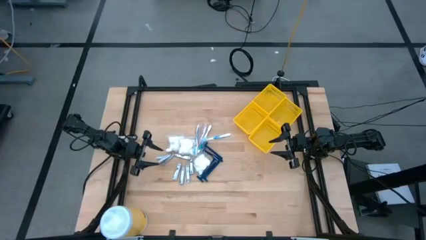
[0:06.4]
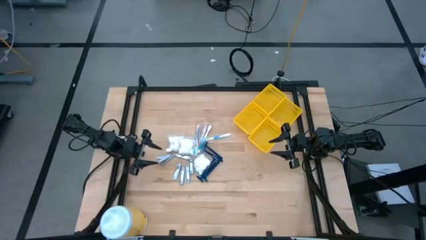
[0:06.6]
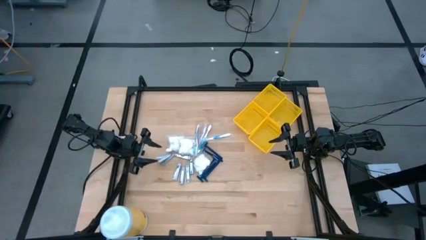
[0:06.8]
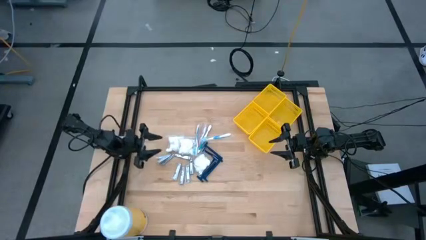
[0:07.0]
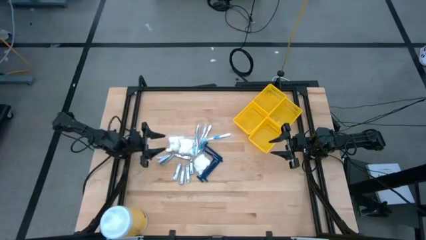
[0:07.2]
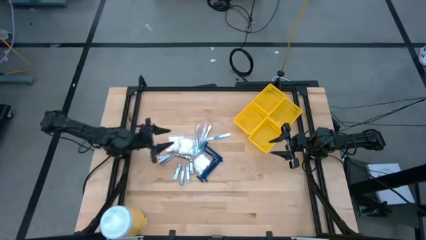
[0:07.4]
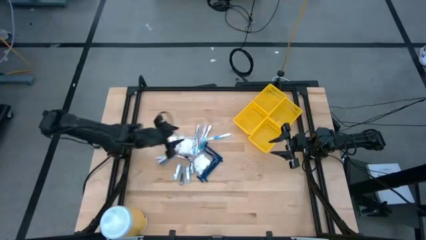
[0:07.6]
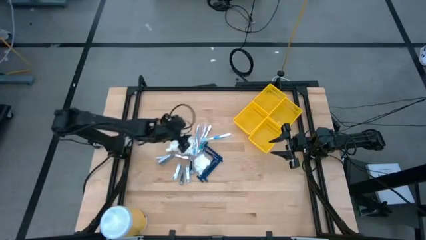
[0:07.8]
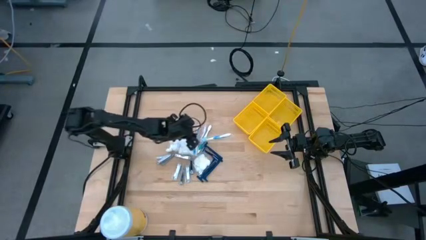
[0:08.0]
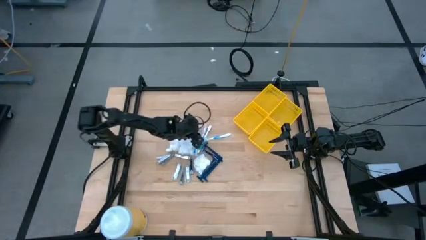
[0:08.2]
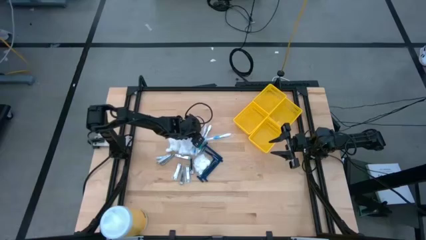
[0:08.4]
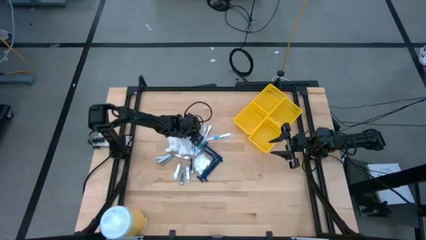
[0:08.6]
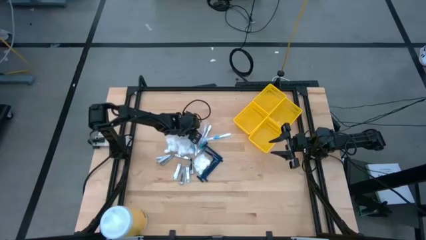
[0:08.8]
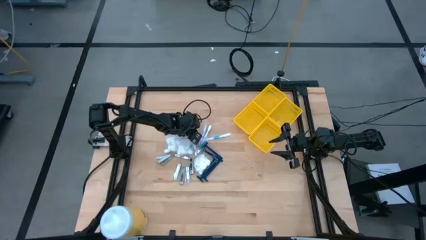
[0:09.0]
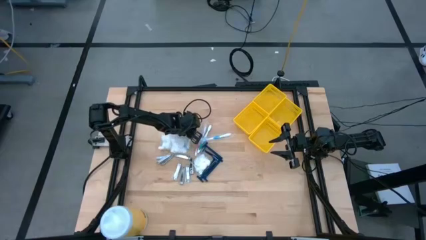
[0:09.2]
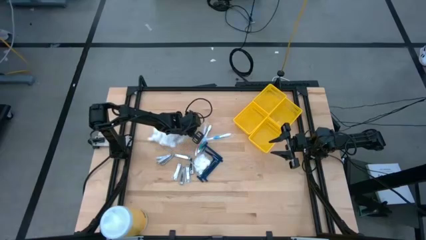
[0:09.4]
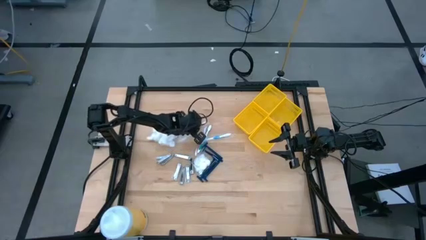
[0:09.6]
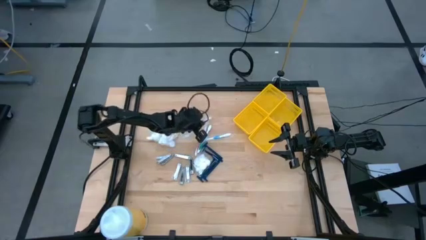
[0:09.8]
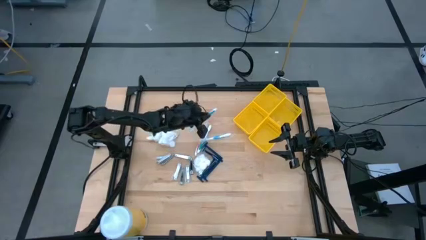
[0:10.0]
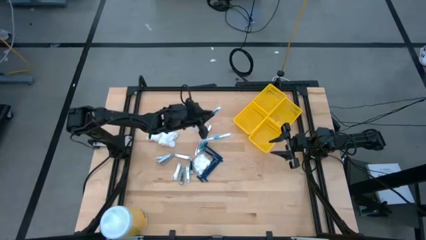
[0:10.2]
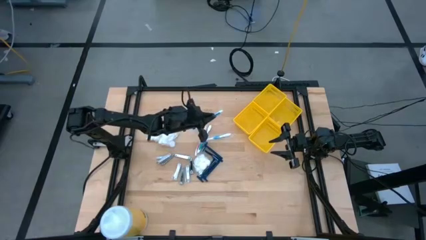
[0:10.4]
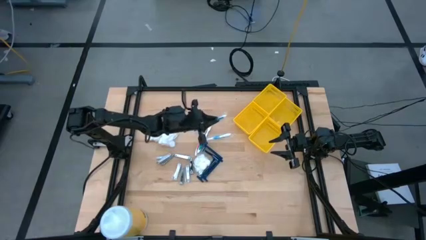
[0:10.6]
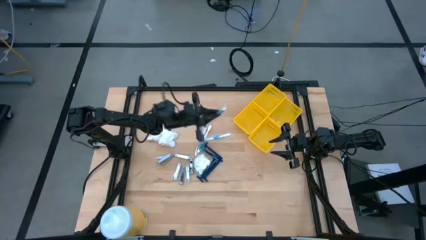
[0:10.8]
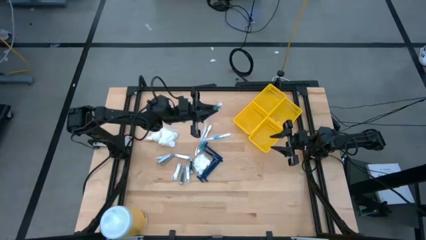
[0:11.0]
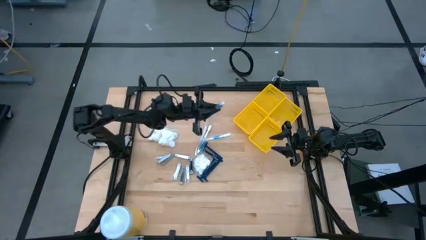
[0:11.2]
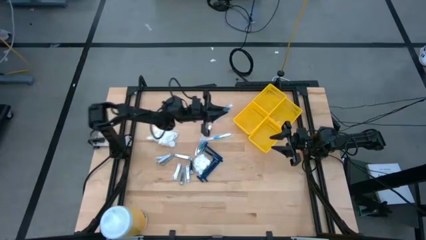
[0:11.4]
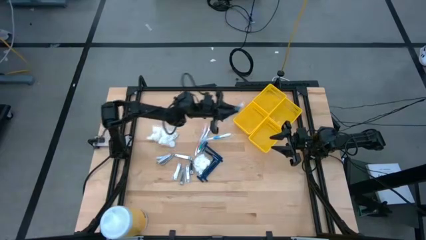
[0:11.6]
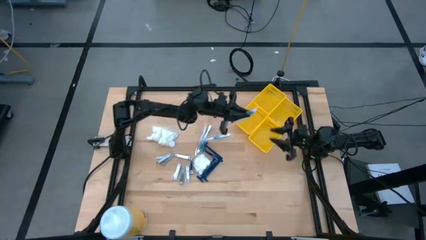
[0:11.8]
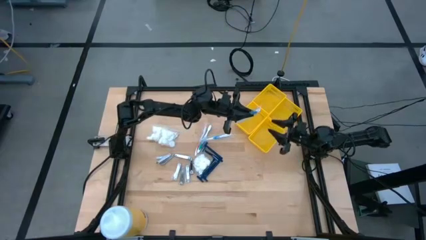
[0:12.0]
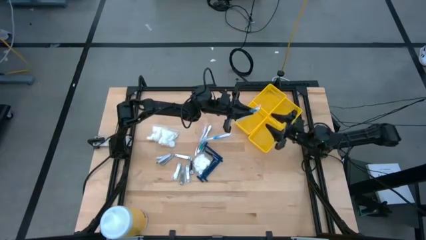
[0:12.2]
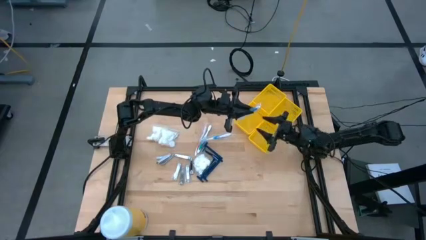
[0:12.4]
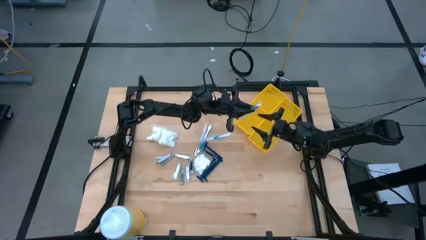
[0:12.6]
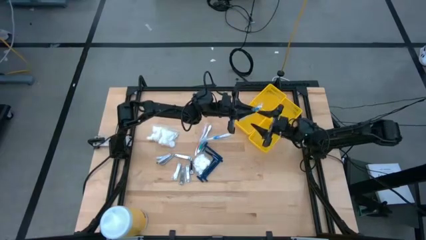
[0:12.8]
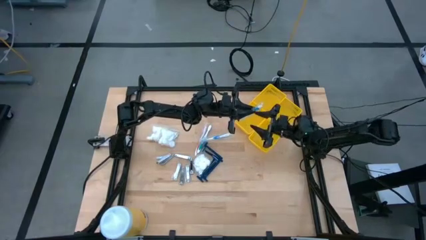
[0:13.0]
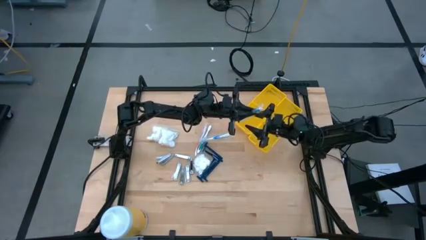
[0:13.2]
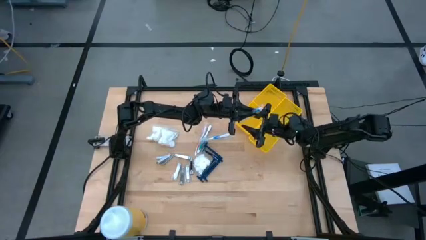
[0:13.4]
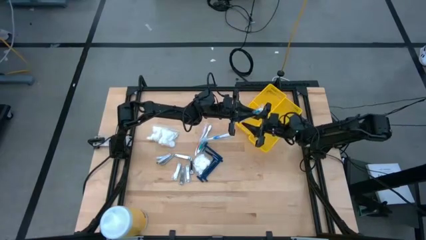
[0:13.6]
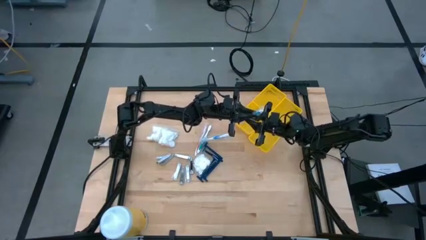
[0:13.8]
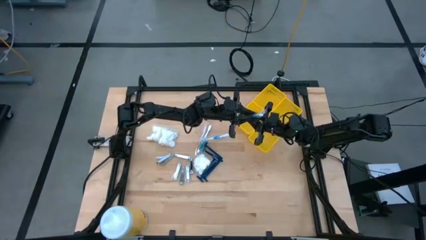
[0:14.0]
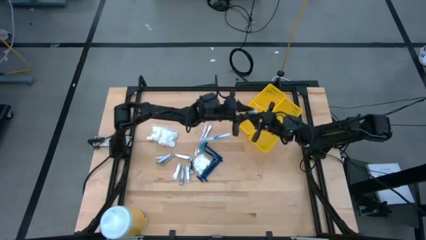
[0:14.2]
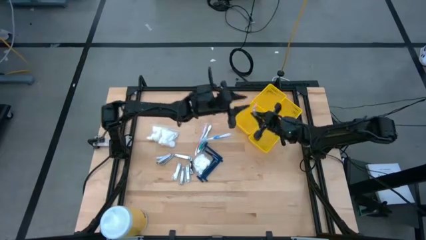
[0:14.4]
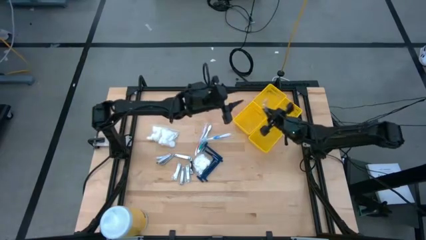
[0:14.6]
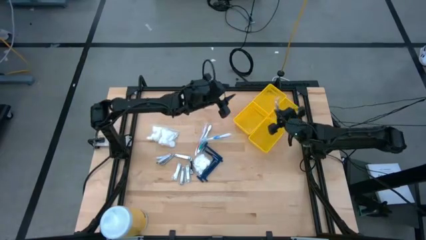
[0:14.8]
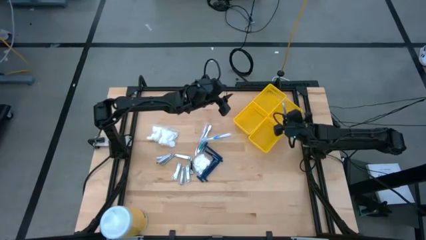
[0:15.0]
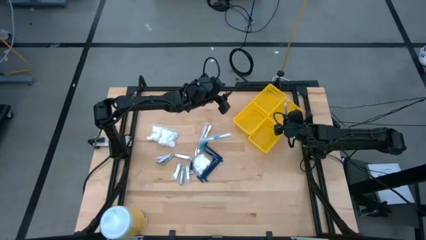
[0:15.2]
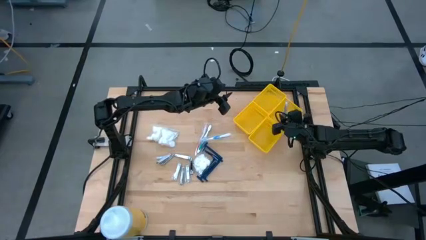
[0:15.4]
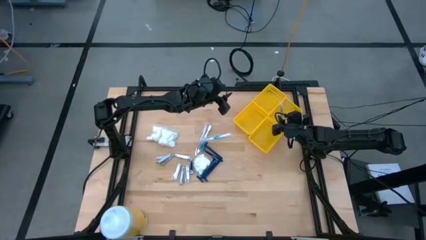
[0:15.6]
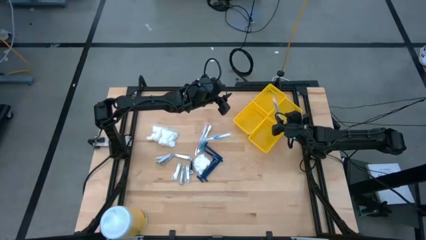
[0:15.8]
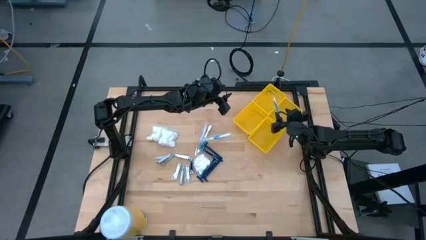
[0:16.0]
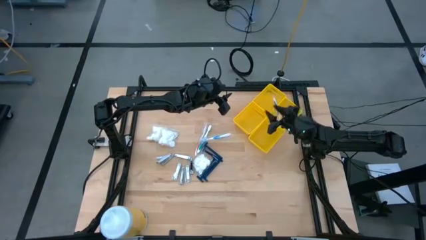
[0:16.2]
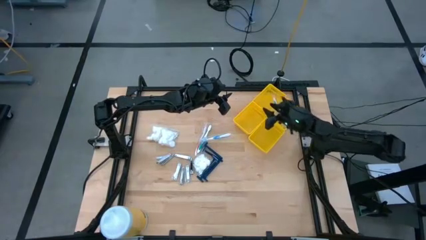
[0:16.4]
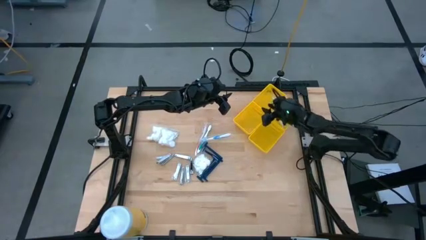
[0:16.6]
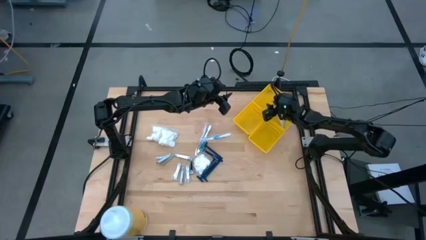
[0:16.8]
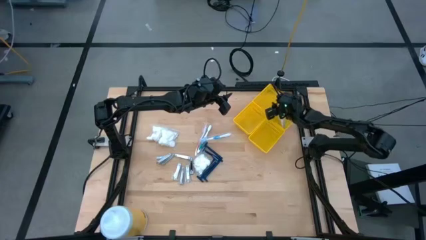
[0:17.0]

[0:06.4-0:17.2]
Task: Pick & Place Travel size toiletries
Put the blue toothbrush into the top right yellow bin

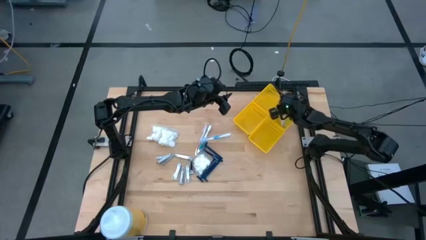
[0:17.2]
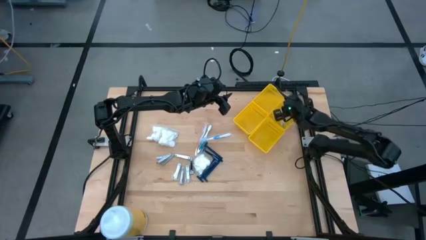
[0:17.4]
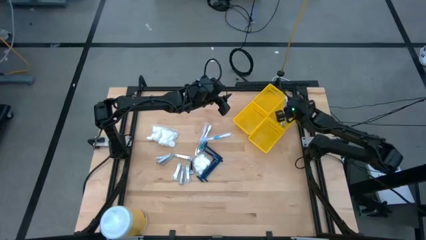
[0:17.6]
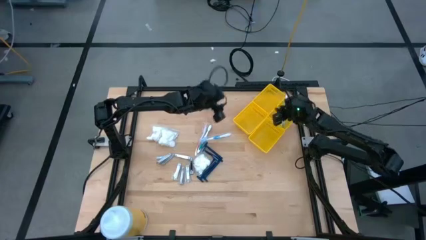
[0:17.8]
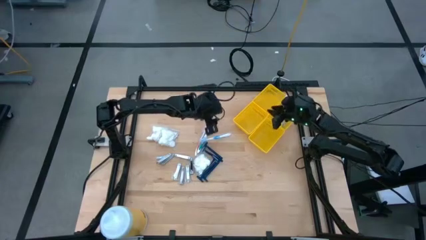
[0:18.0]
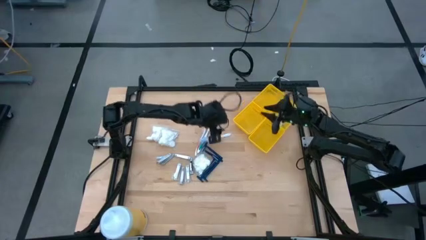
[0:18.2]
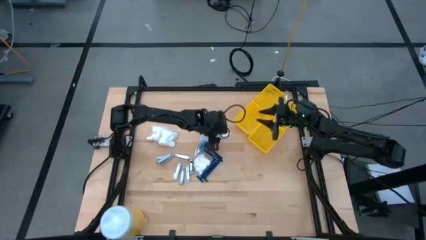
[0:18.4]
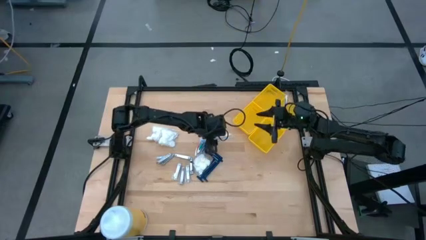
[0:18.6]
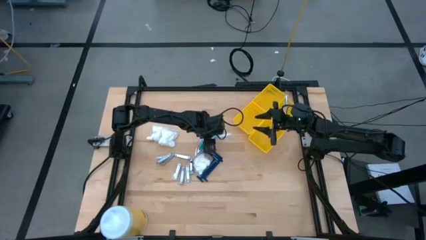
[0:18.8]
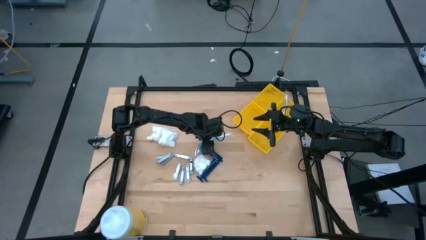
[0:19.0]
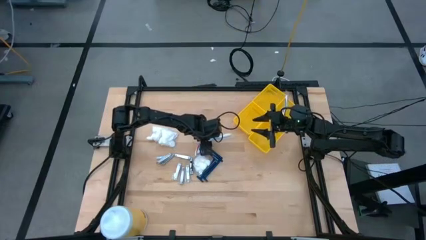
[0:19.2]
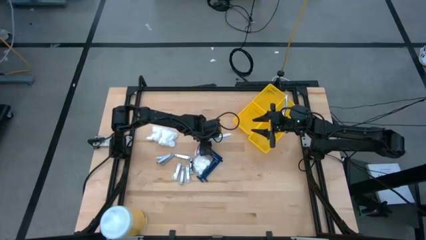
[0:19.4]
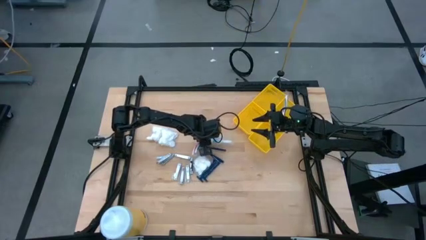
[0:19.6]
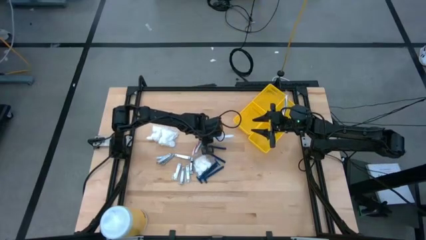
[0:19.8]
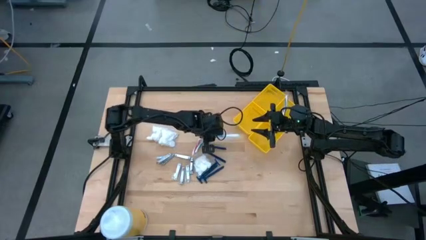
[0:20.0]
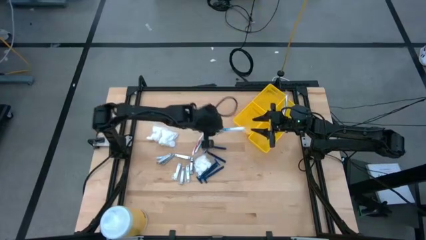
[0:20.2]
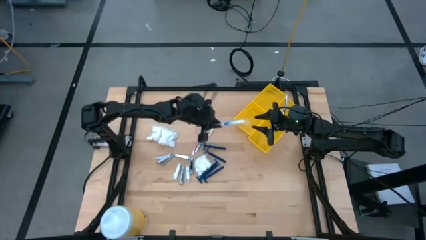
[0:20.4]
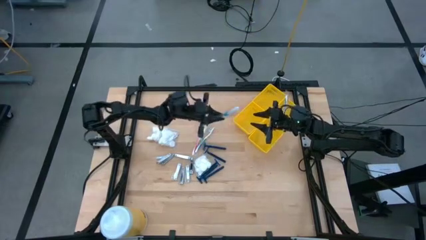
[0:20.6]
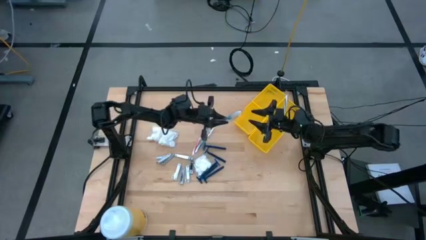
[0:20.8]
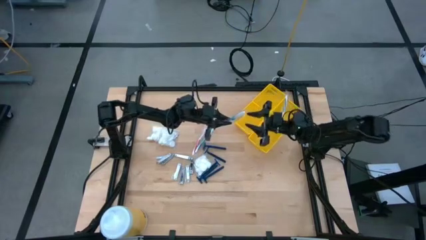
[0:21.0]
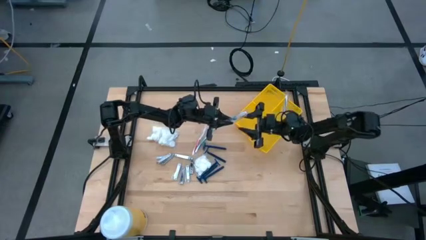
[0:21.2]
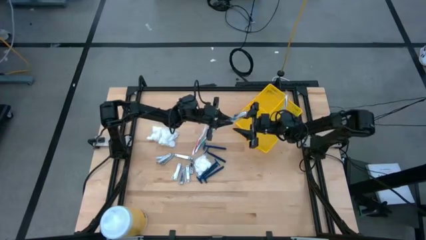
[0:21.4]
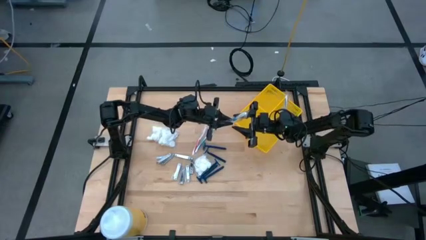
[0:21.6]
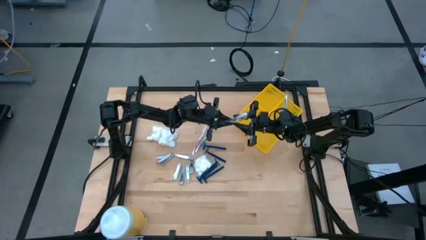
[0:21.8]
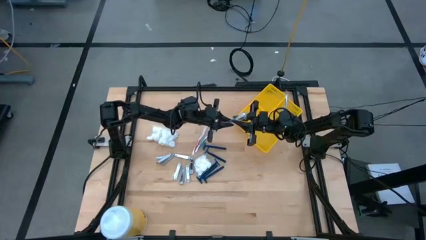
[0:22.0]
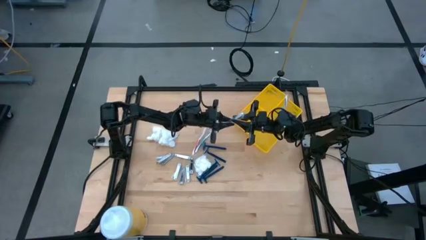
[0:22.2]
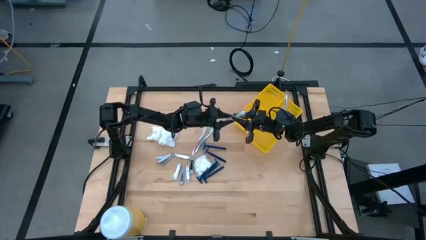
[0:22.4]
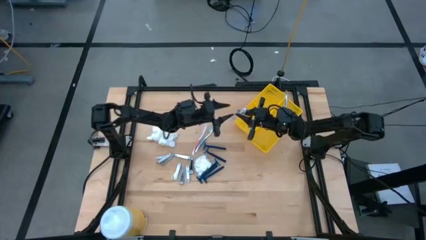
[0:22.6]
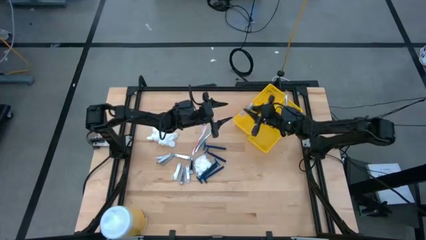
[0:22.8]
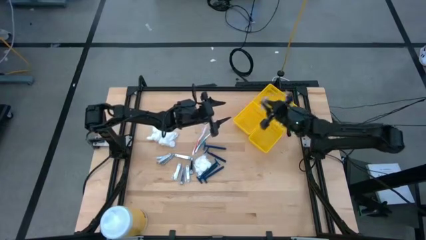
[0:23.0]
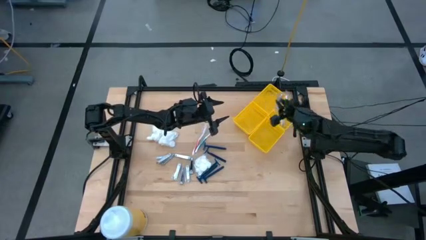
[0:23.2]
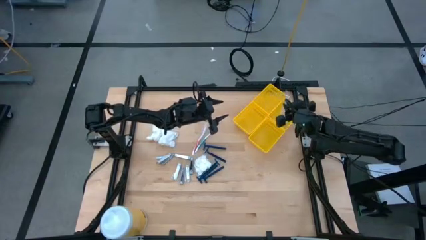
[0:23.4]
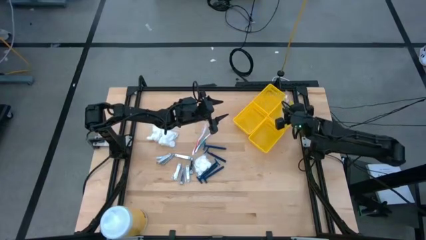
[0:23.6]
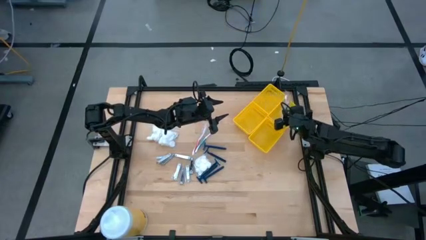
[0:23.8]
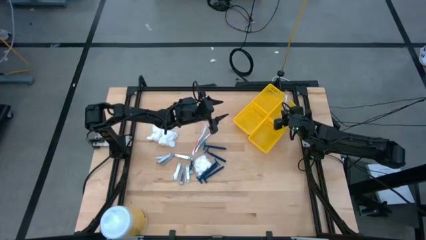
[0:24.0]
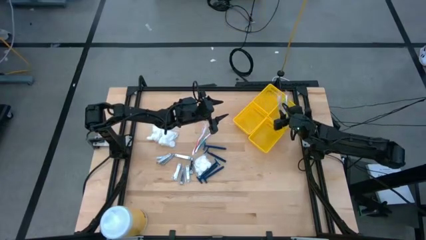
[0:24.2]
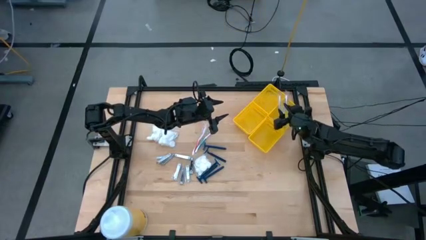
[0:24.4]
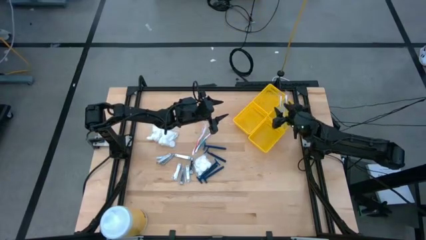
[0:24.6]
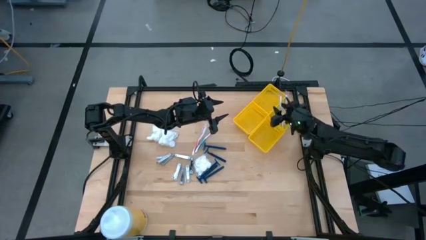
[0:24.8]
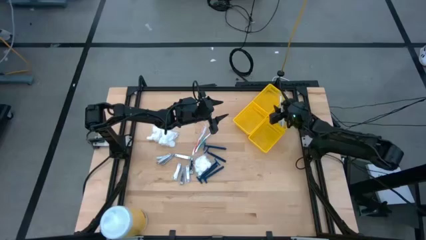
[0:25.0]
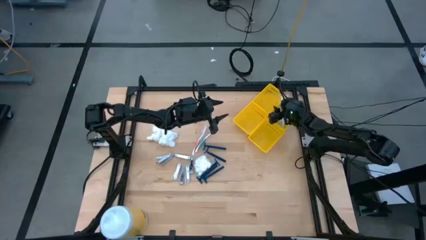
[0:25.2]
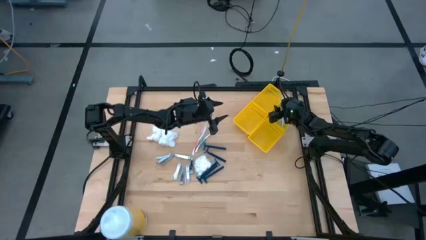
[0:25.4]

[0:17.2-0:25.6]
Put the blue toothbrush into the top right yellow bin
